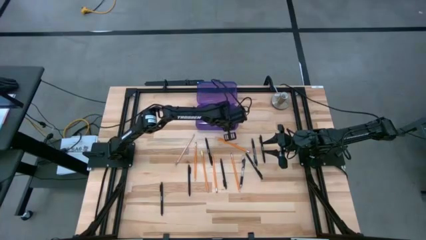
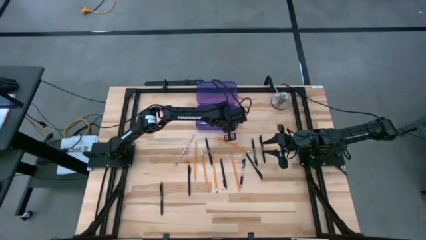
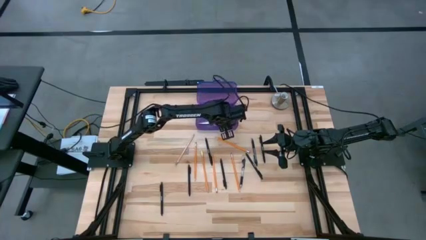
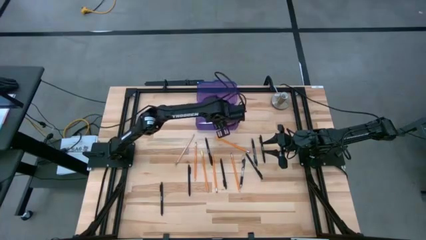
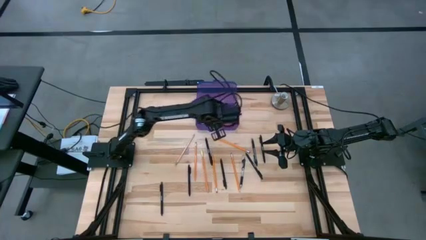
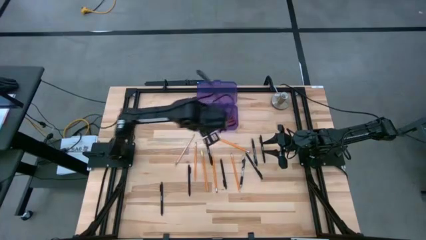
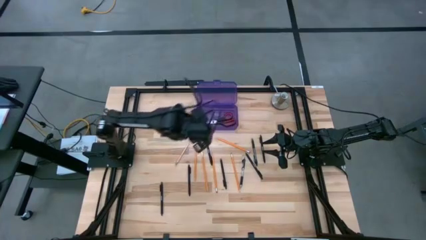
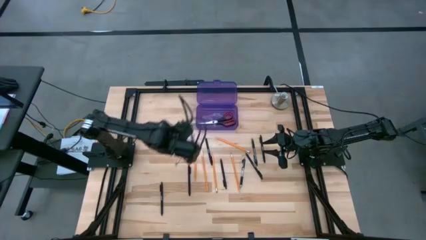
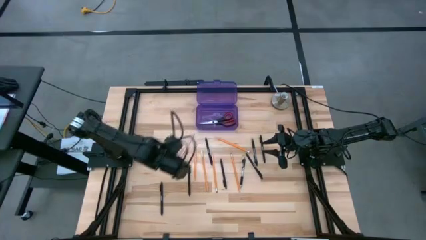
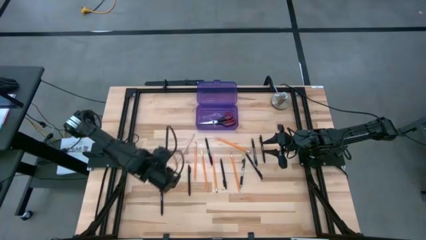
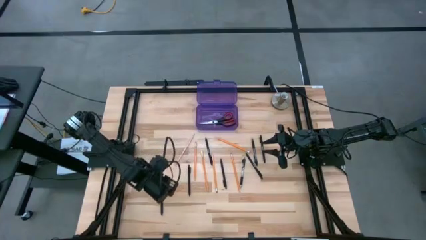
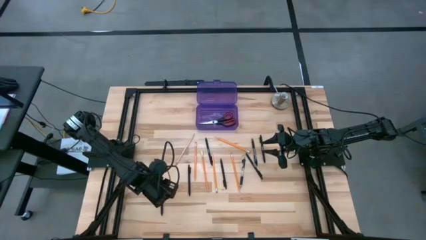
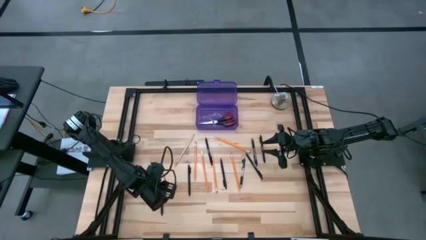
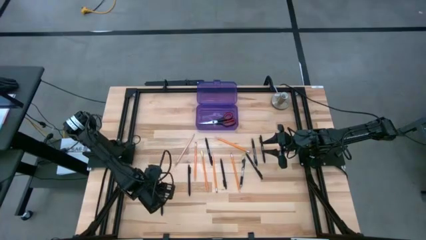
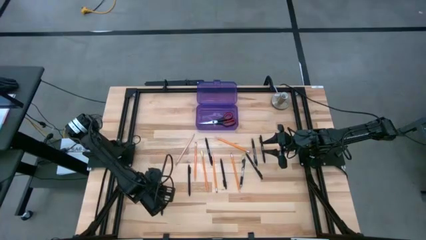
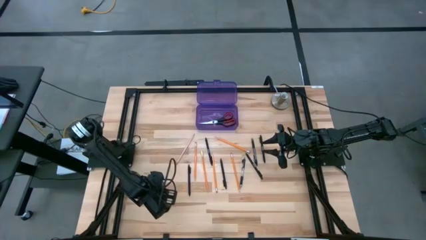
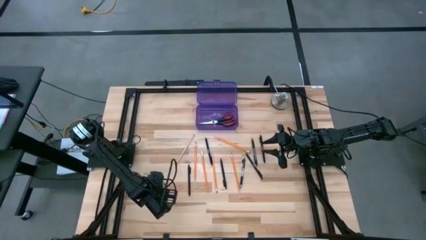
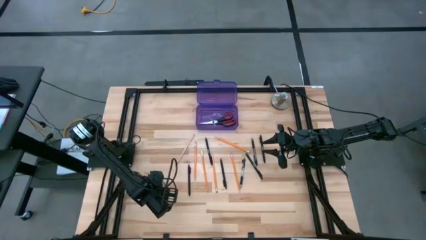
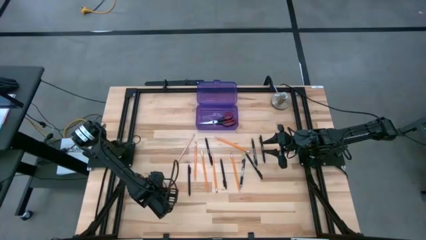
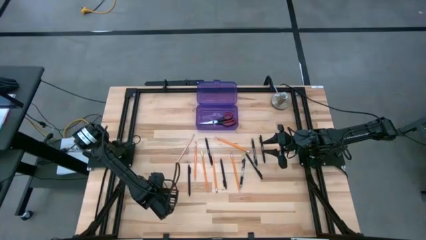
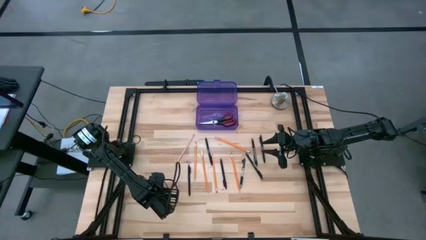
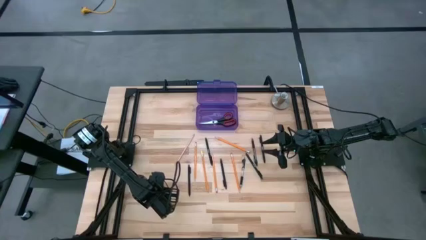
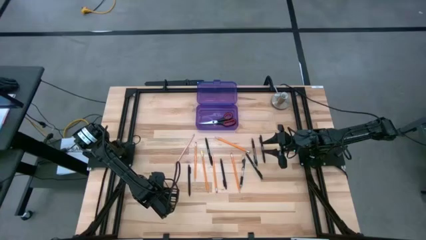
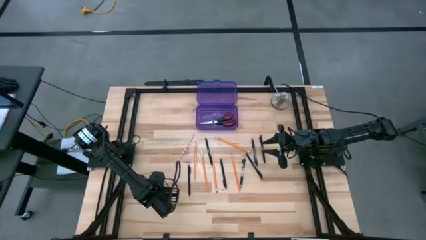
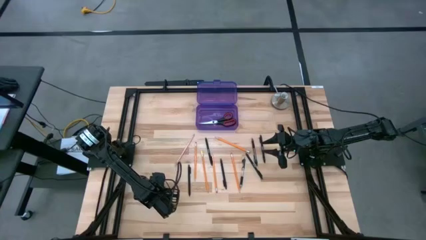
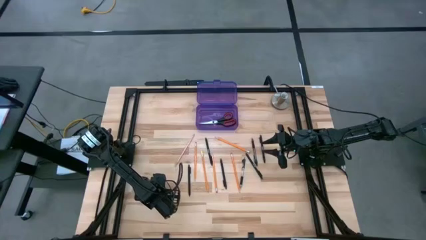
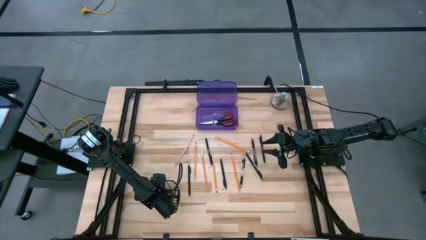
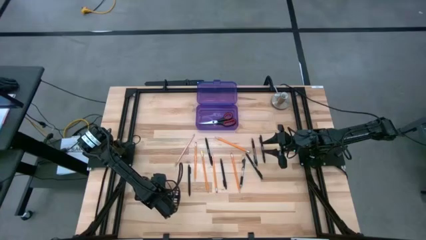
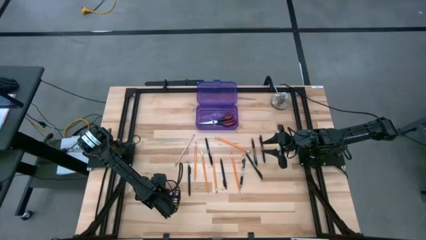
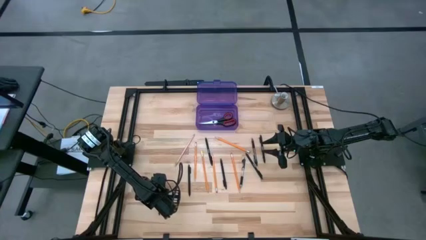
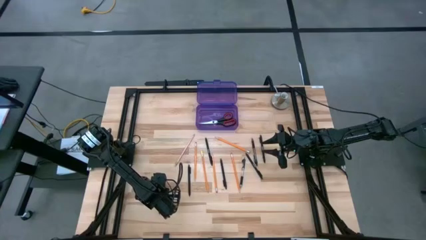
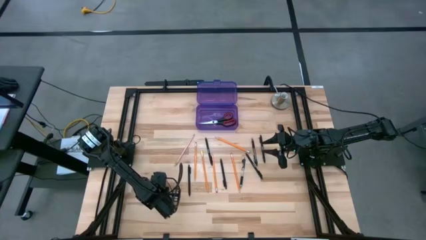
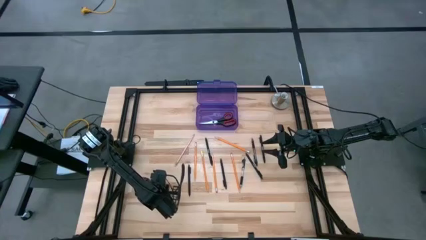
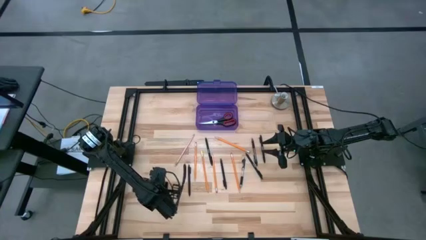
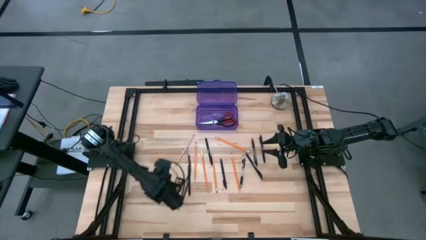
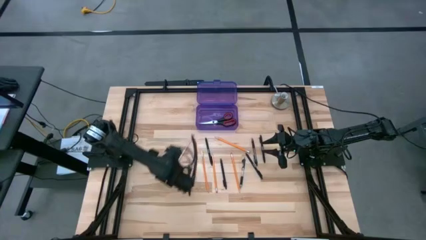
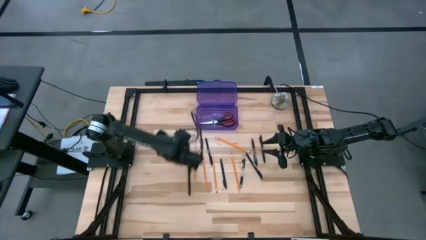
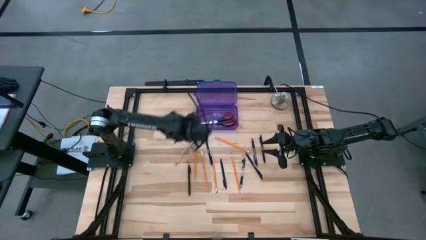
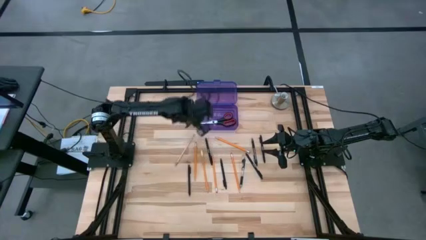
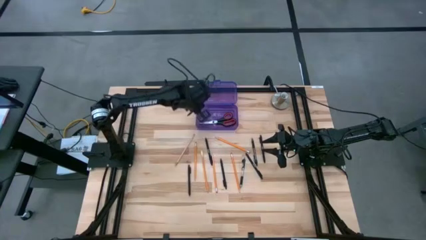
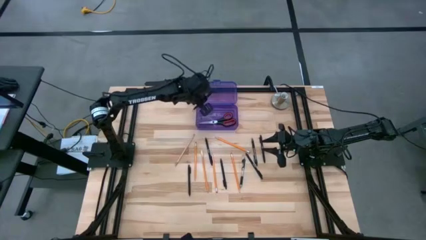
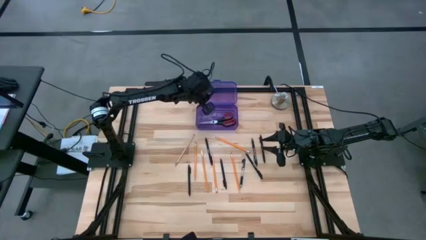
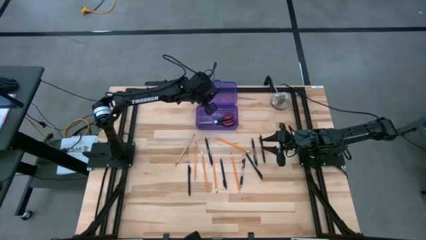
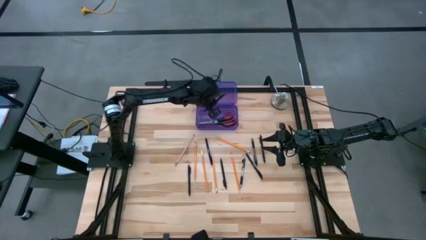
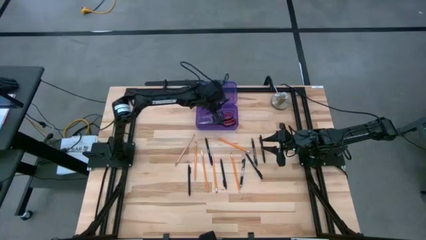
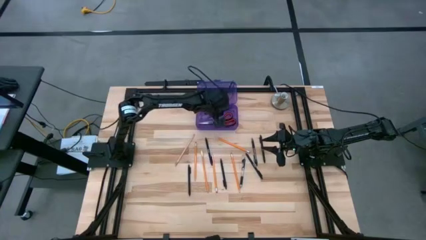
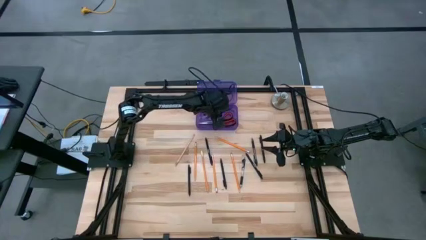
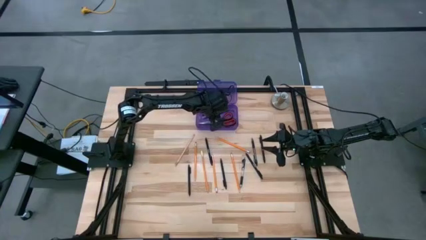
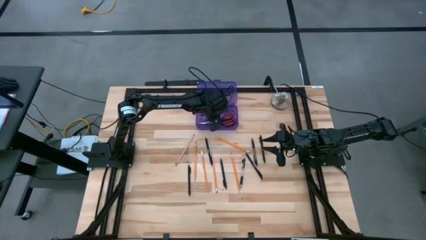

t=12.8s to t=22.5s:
Task: Pick & place school supplies into a supply box
Put the black pen into the violet supply box

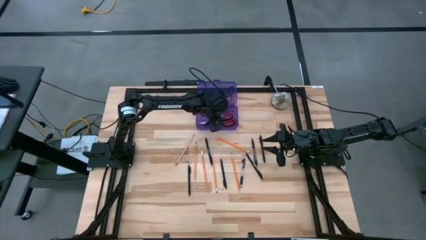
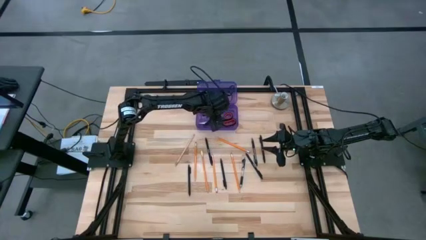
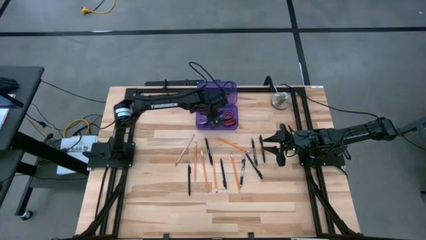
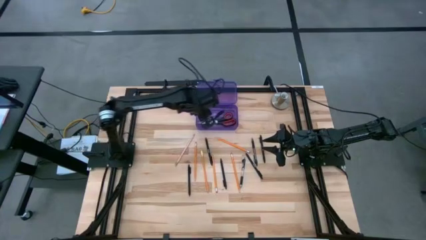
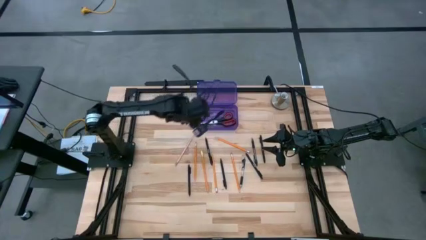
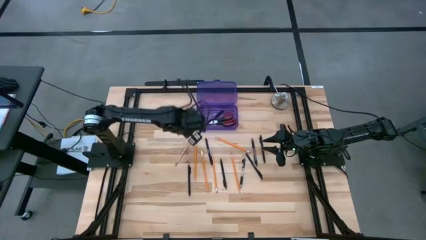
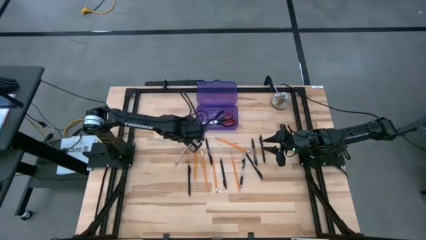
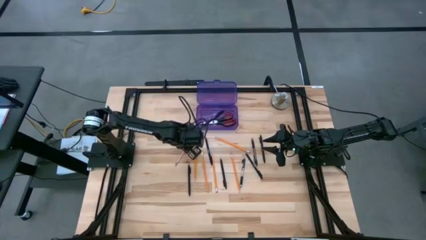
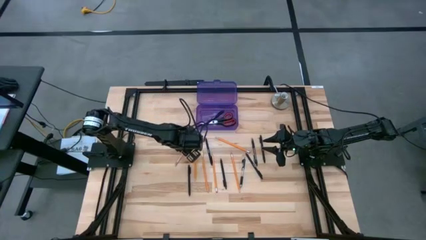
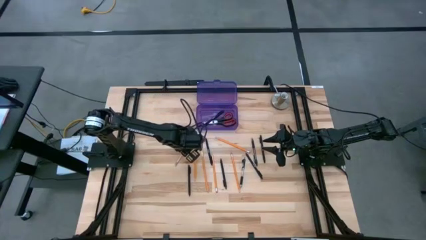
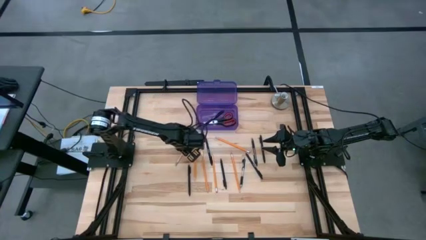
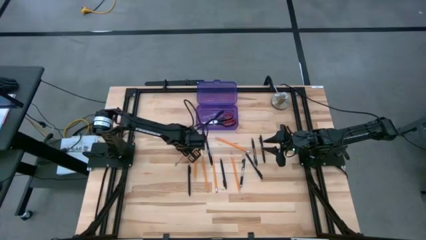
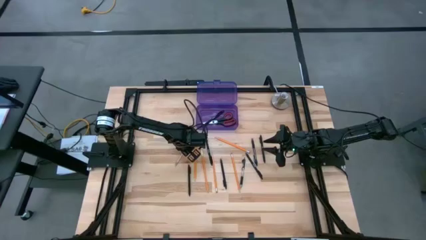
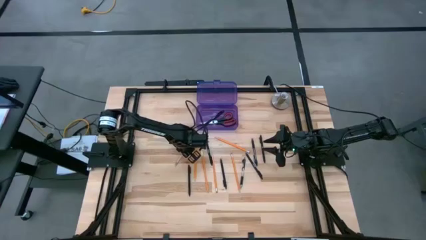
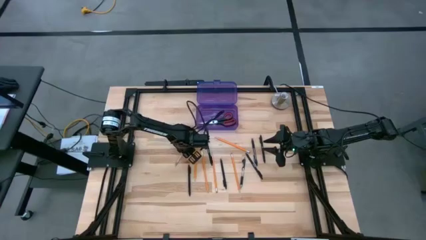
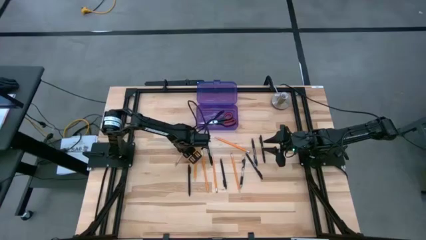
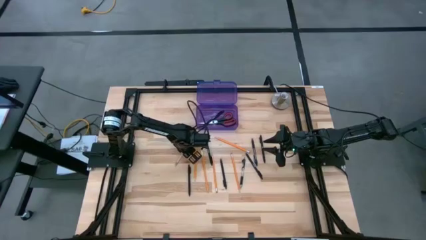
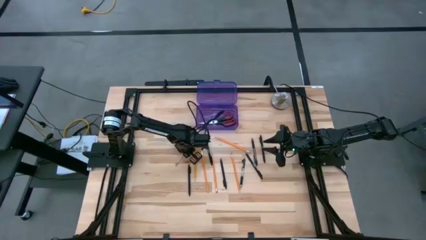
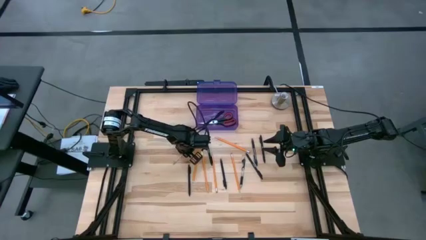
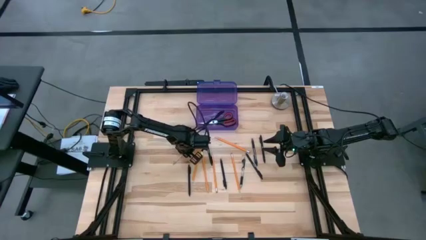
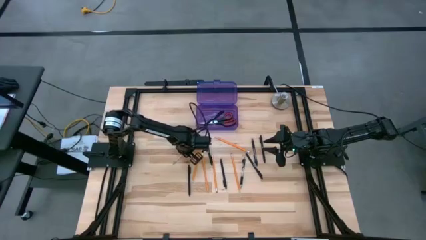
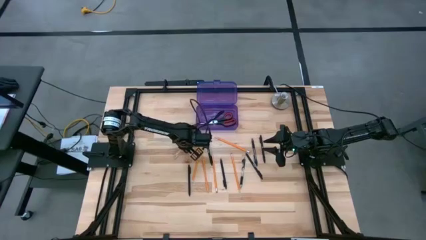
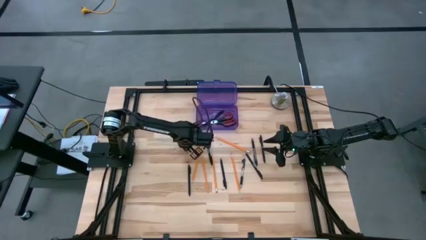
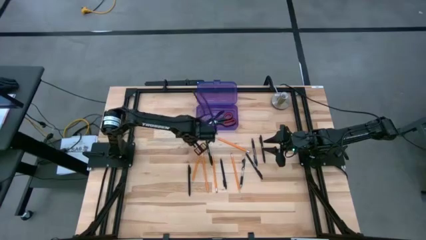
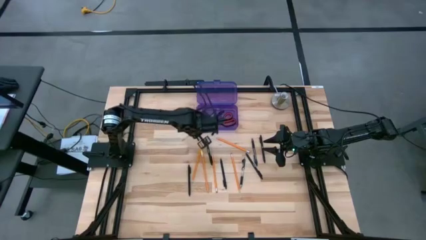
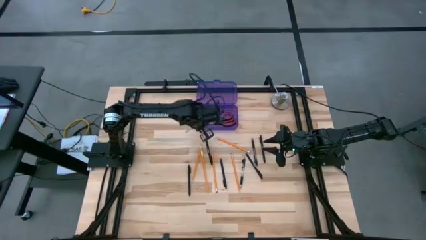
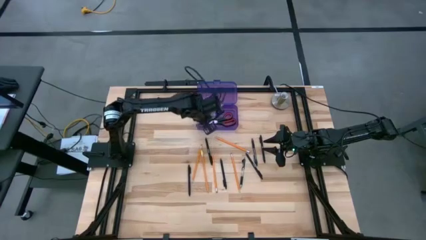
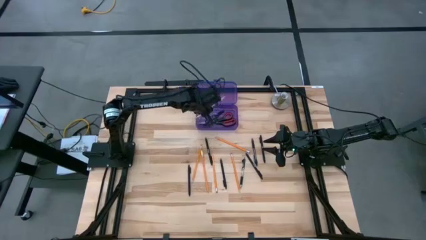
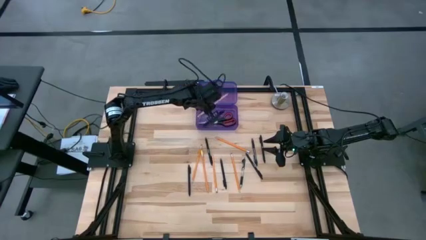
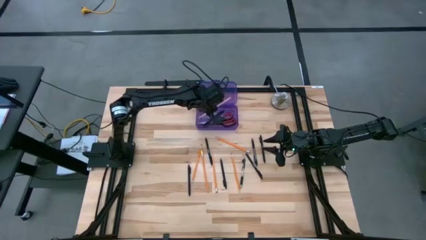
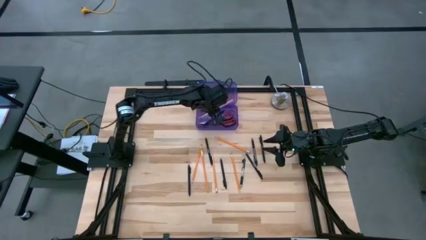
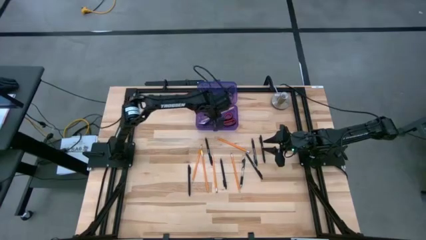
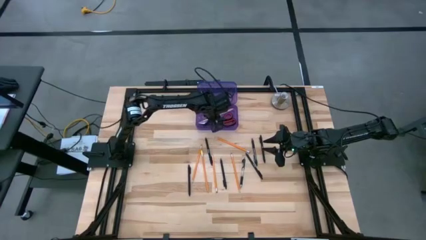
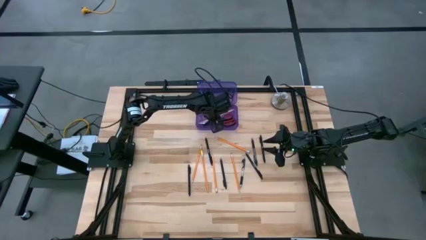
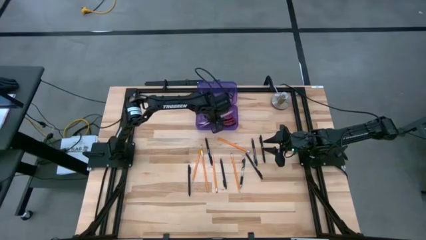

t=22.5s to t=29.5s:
Put the pink pencil into the violet supply box
